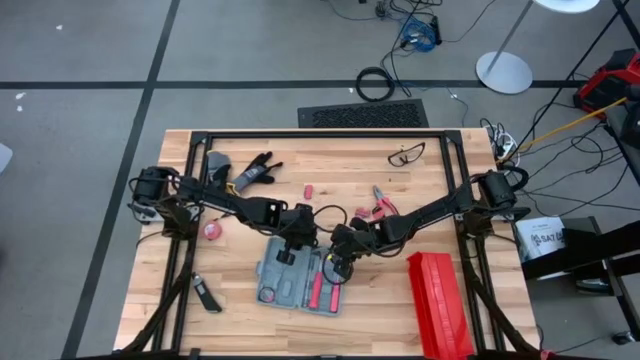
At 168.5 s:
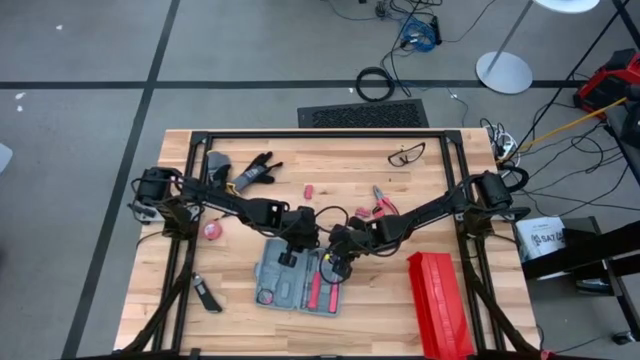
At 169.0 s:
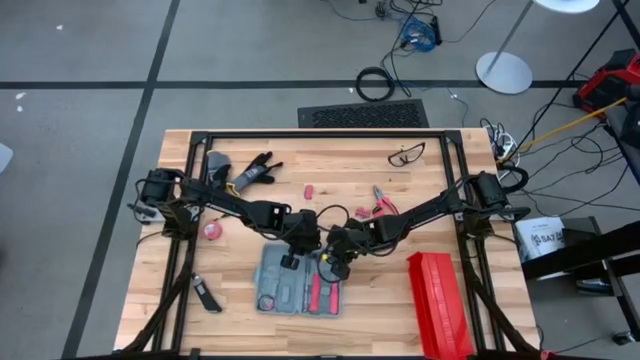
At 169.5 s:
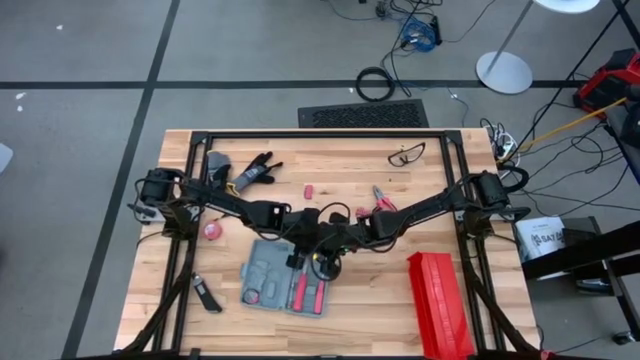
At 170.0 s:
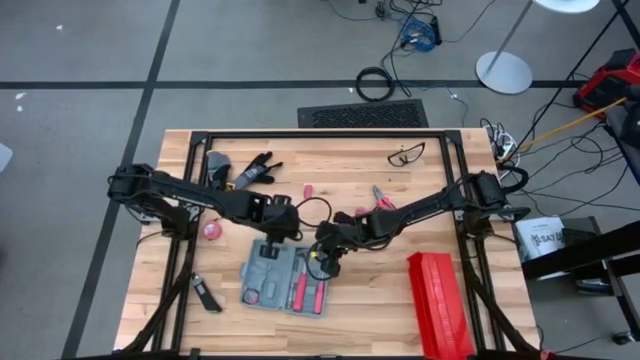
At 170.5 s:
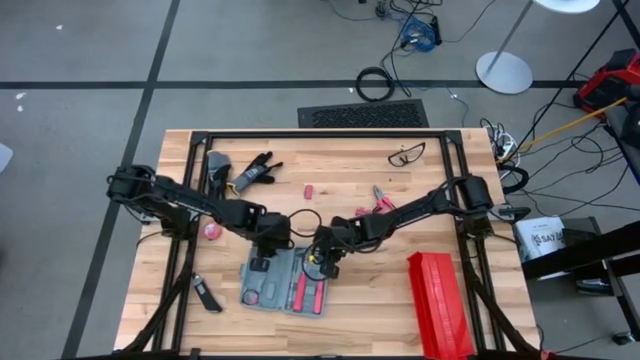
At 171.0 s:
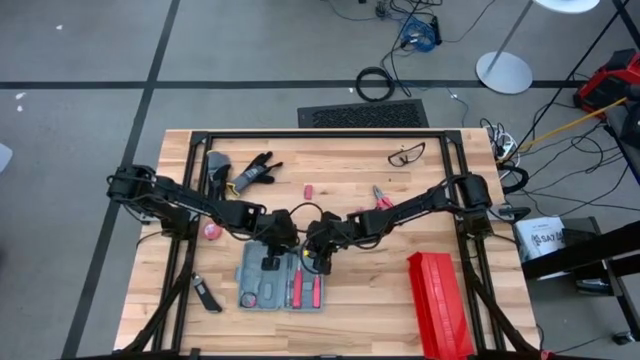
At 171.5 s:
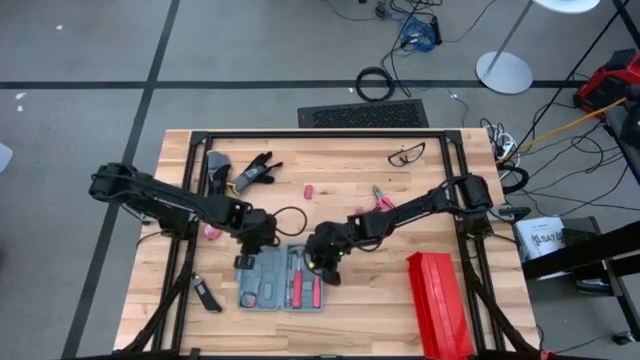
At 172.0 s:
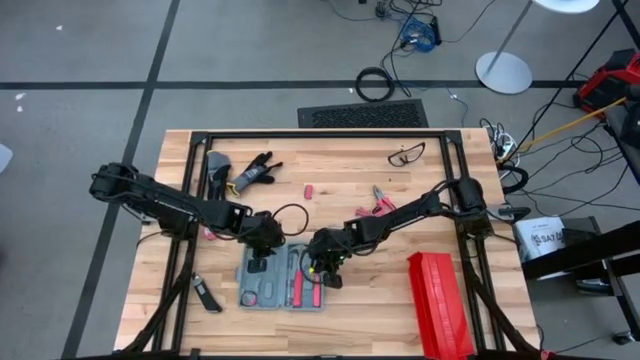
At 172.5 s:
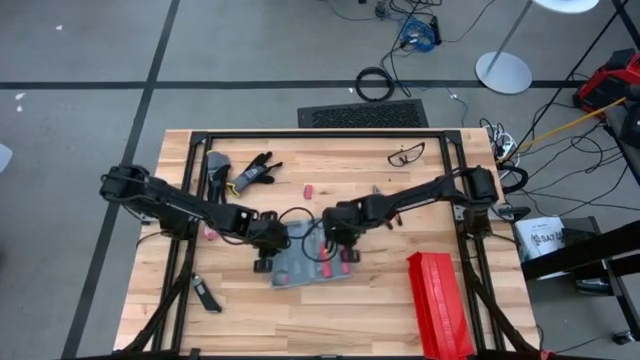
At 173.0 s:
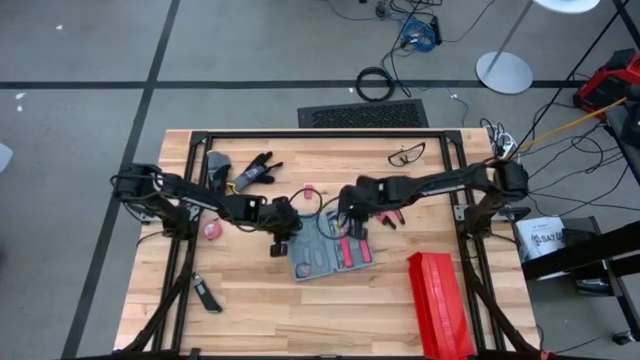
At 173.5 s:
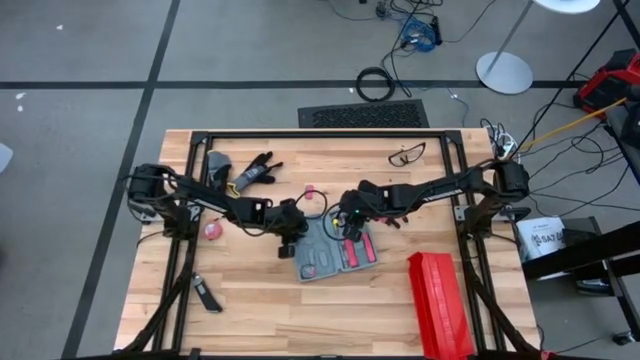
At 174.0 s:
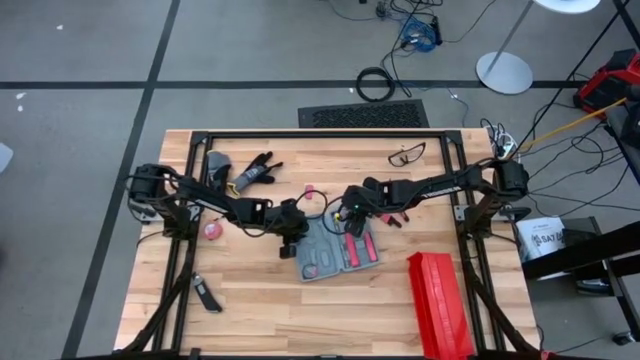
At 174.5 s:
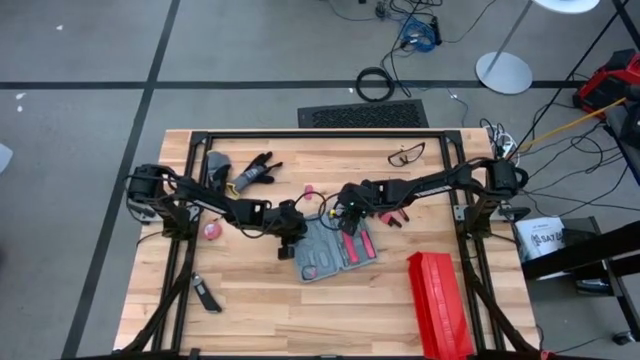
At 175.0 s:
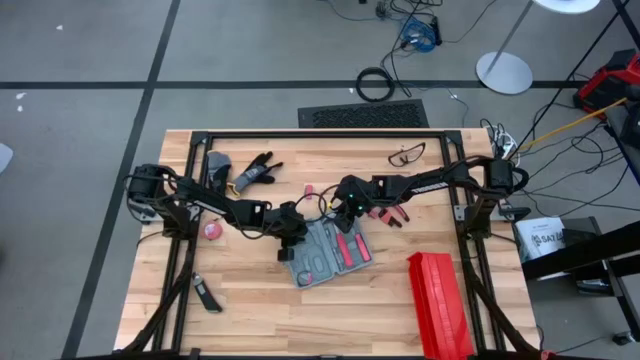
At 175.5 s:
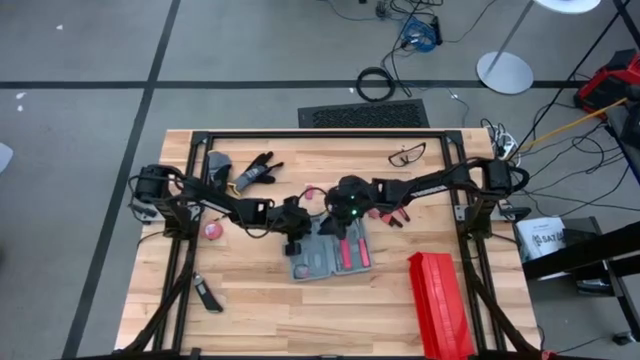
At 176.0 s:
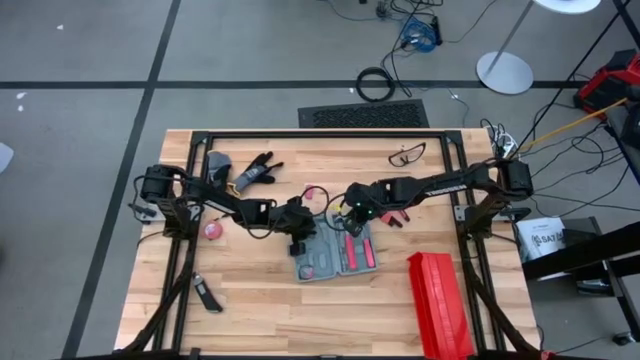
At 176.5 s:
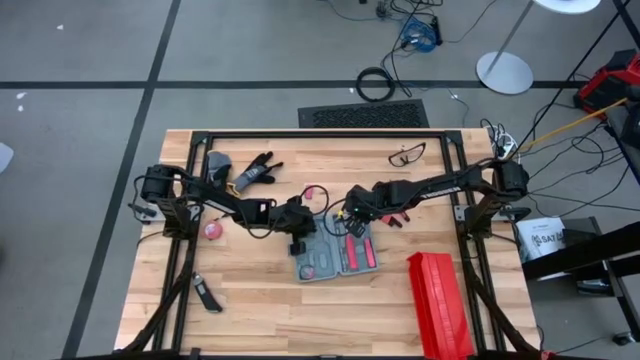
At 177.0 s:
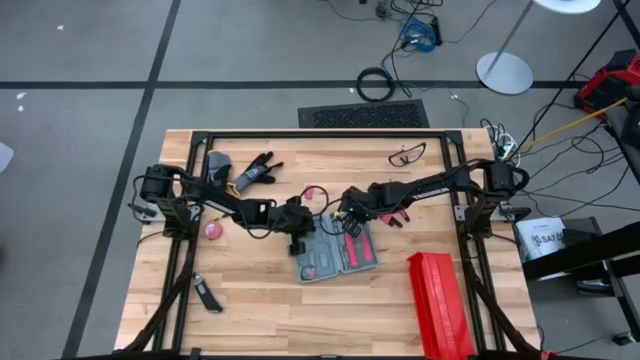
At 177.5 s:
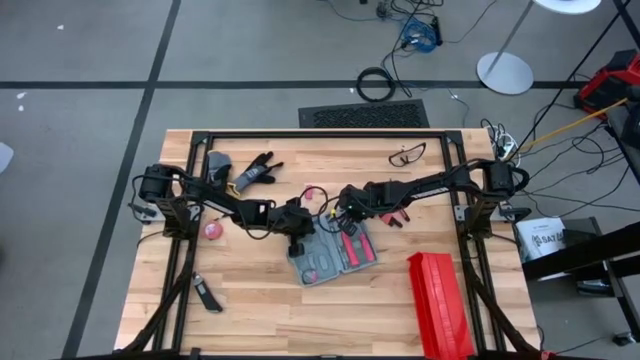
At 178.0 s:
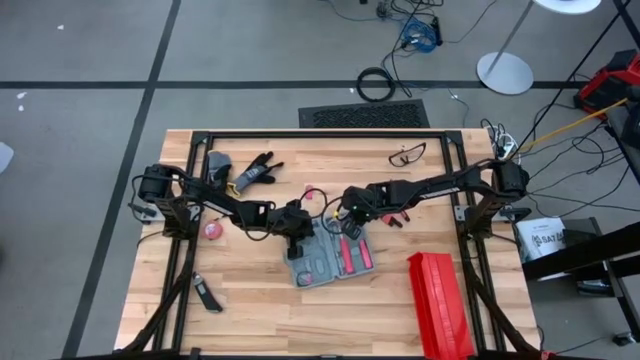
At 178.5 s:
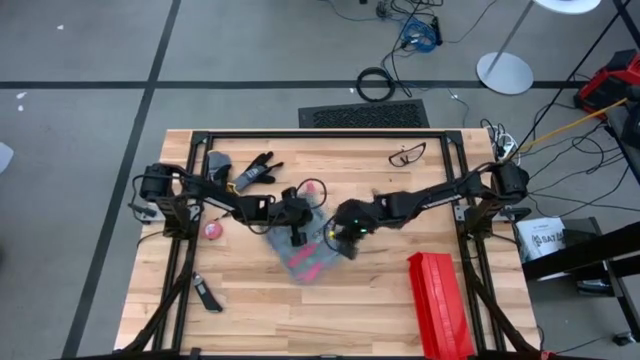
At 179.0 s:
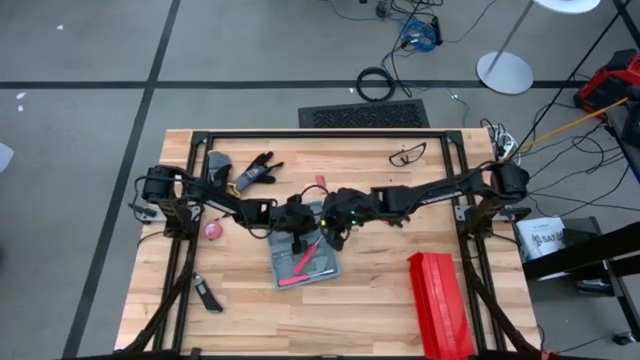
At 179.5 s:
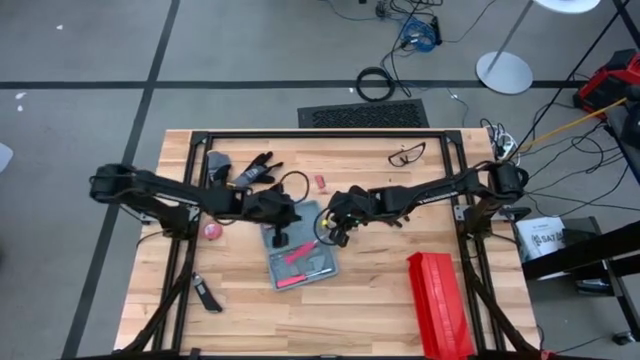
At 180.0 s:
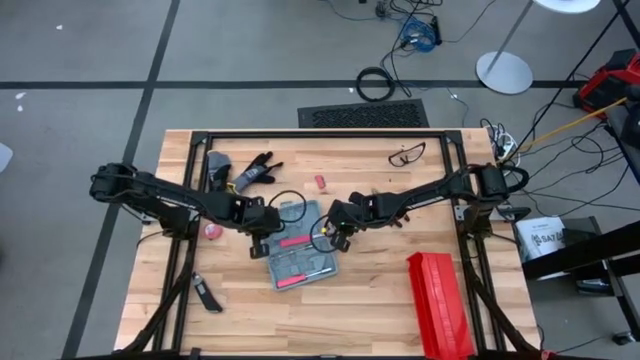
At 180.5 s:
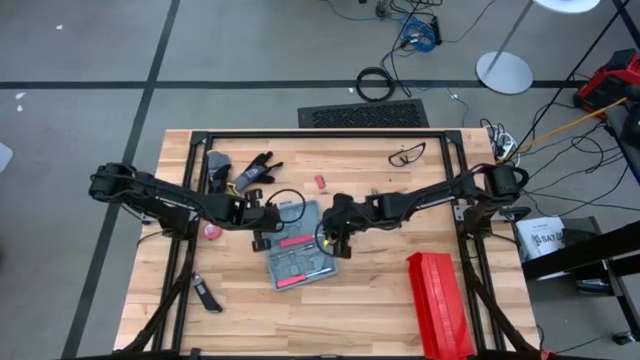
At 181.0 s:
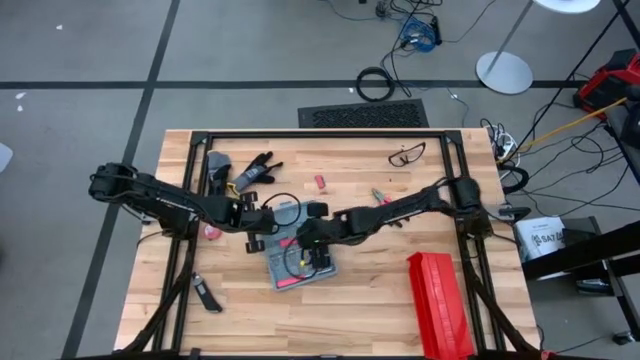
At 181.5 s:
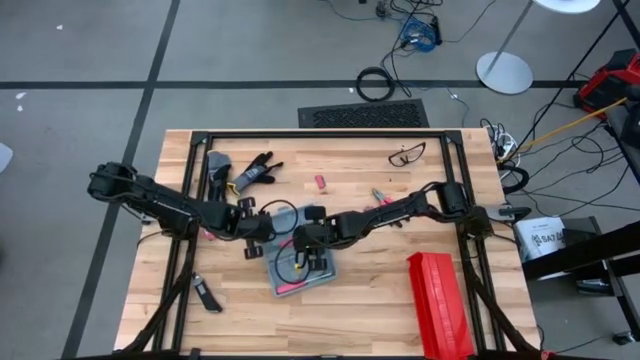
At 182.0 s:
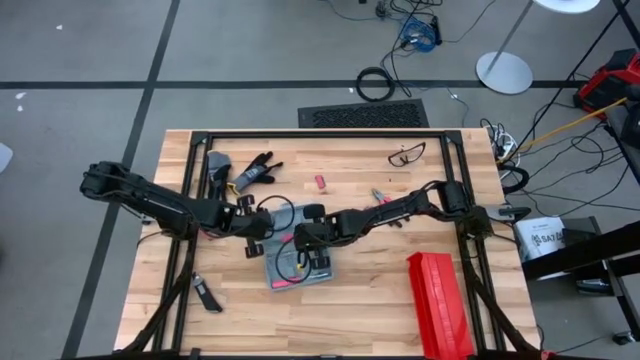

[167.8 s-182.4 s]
Task: prefit tool cases
Put the red hammer into the gray prefit tools case

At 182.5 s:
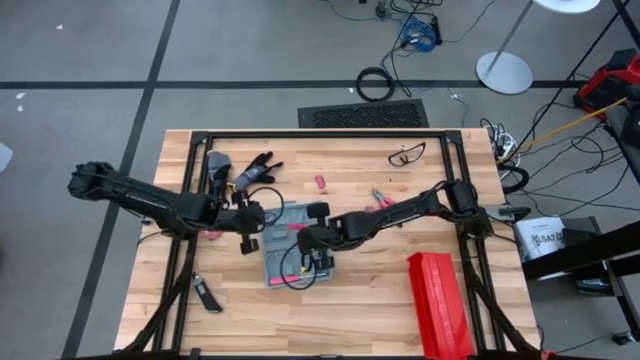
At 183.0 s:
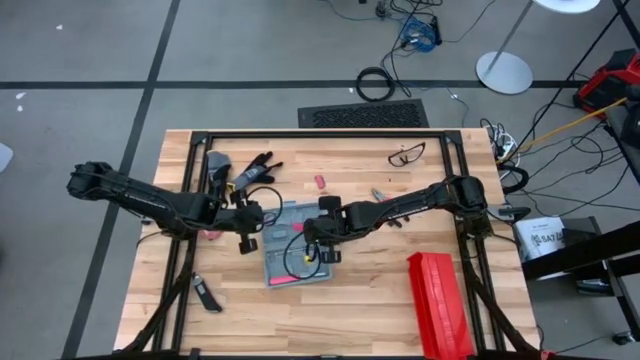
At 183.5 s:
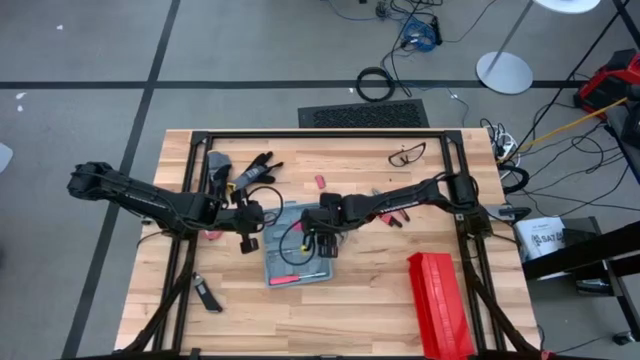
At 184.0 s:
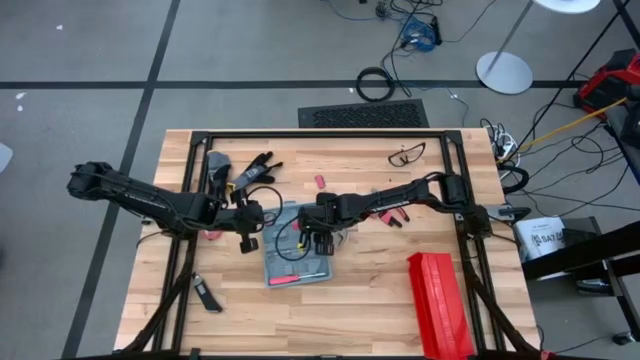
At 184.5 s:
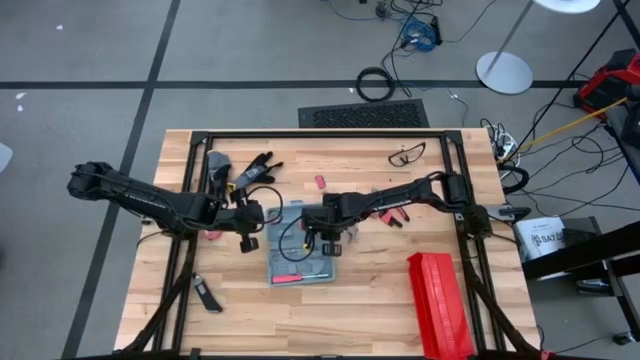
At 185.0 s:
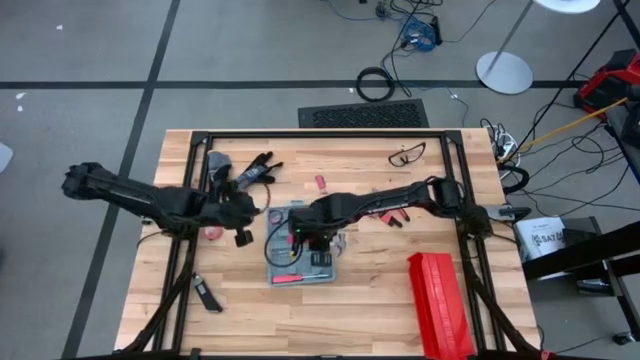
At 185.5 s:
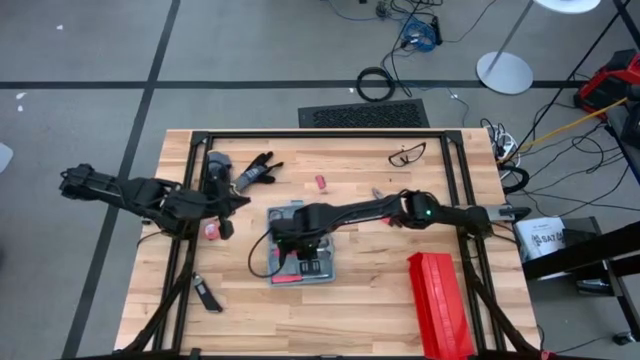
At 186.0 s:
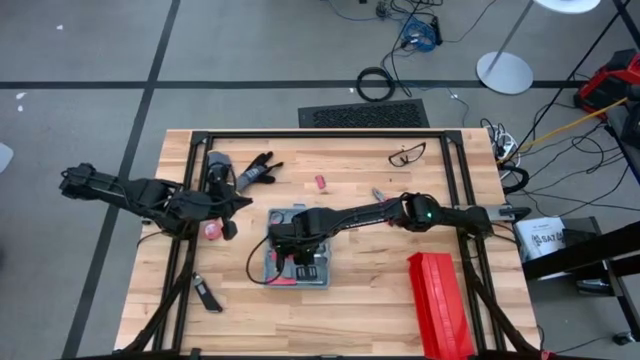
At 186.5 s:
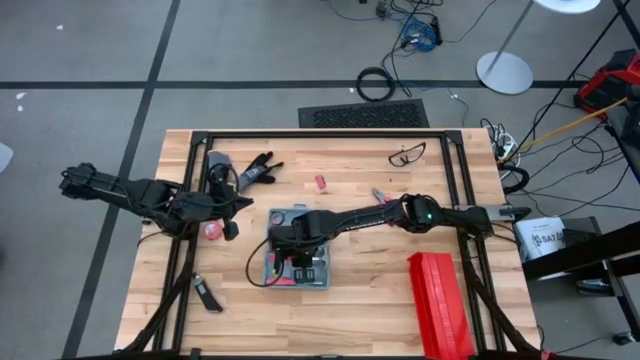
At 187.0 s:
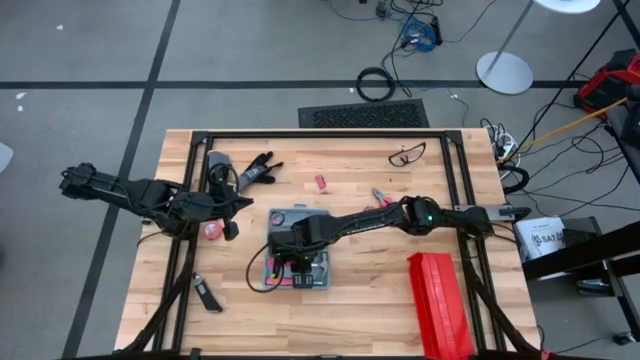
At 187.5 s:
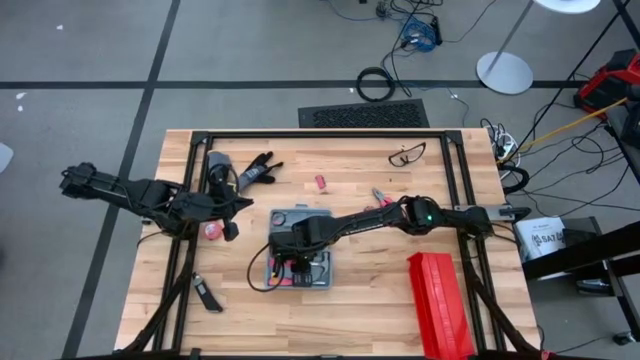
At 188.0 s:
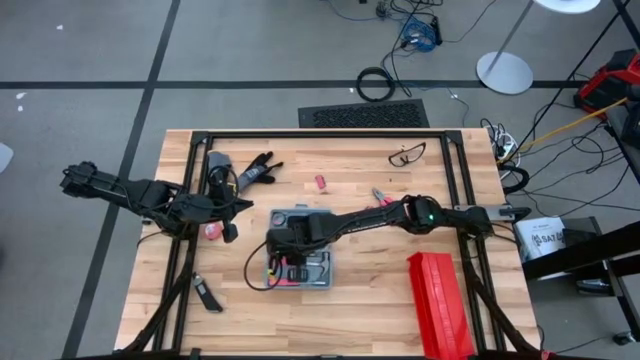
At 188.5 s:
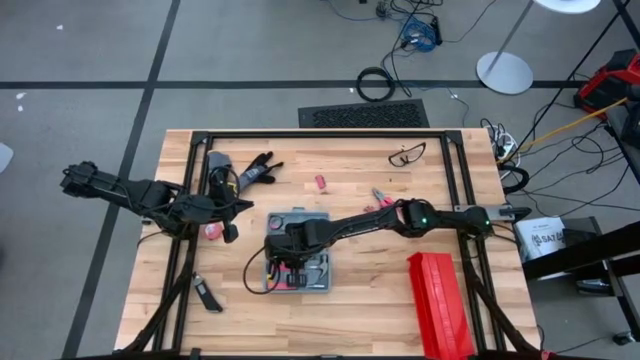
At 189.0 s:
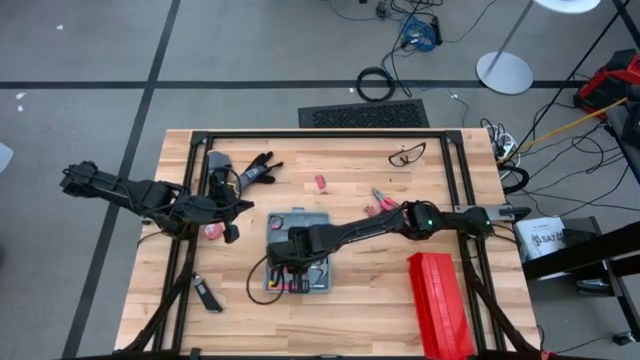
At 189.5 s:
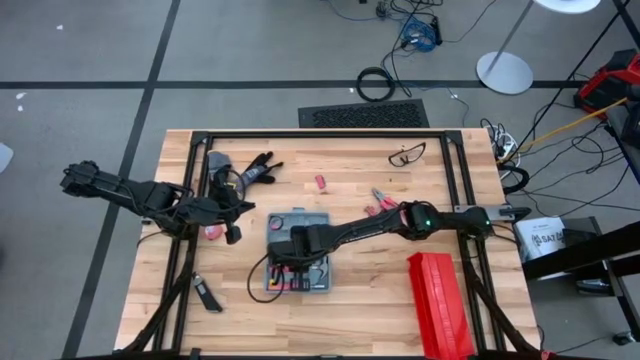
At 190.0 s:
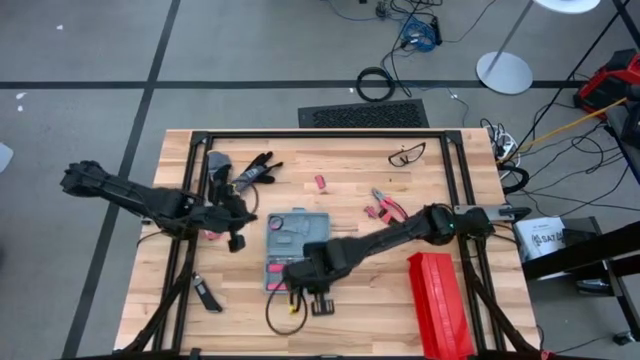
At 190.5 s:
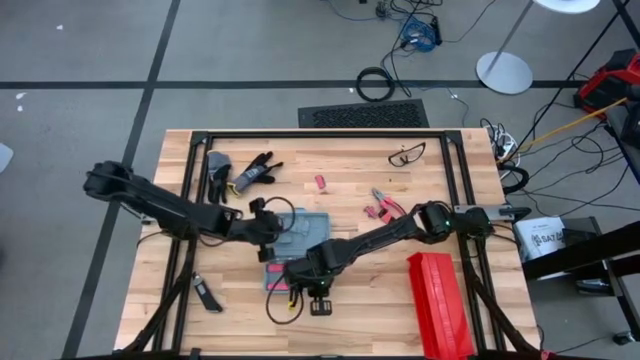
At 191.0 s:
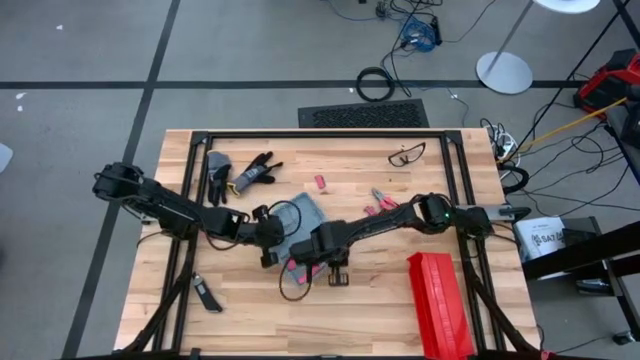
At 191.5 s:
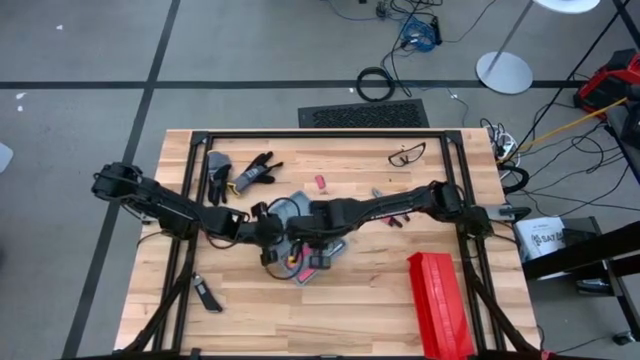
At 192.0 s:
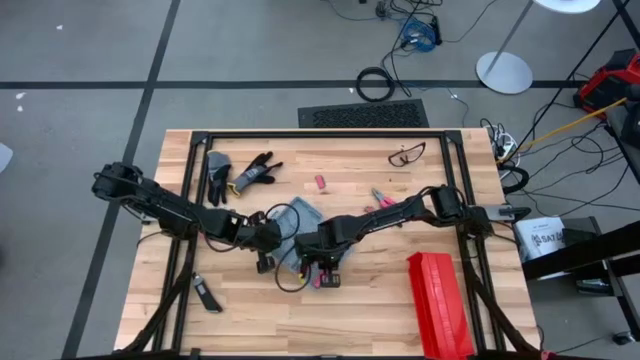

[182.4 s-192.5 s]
Put the red hammer into the gray prefit tools case
